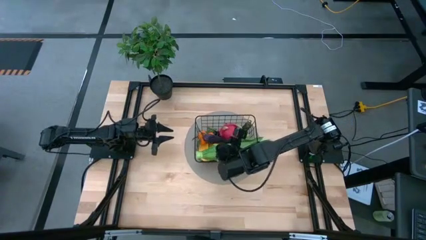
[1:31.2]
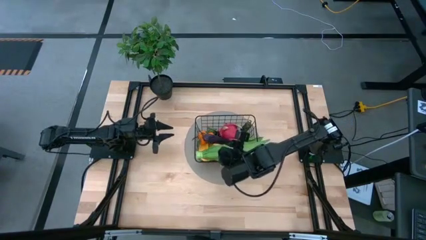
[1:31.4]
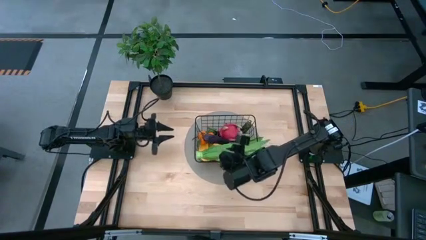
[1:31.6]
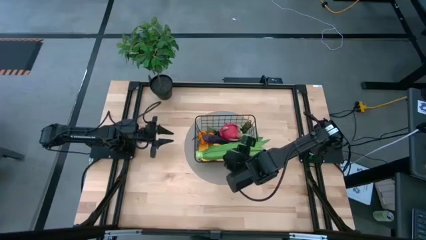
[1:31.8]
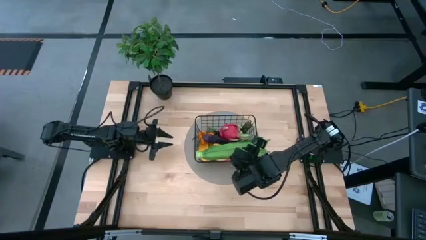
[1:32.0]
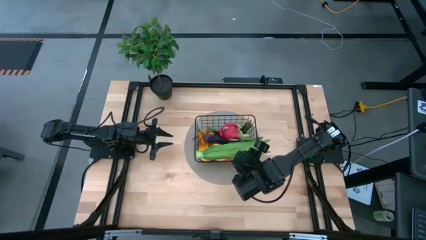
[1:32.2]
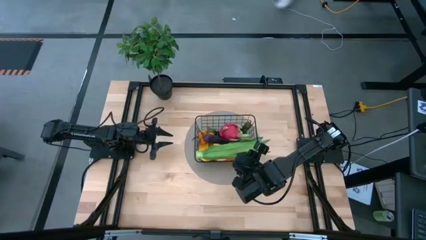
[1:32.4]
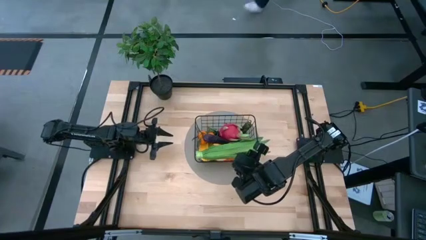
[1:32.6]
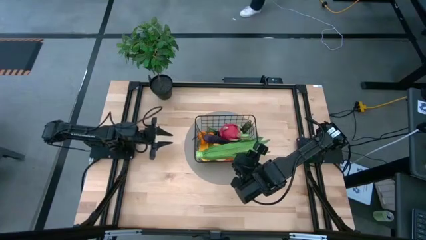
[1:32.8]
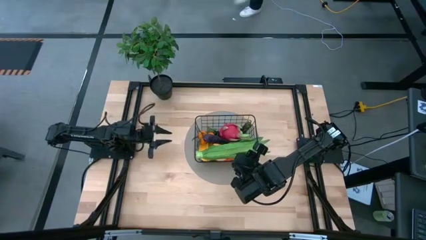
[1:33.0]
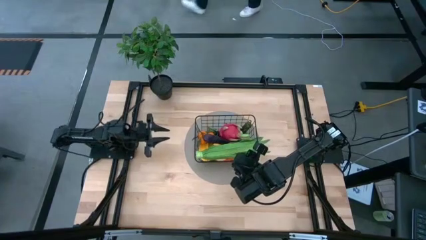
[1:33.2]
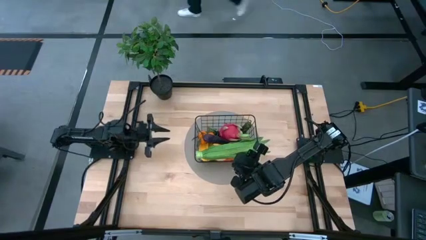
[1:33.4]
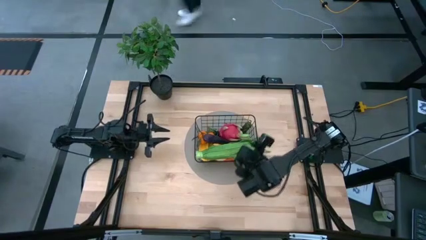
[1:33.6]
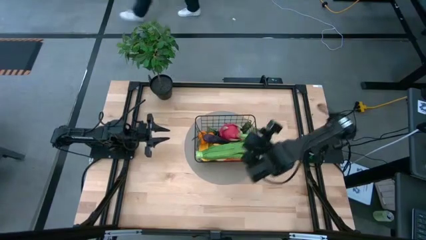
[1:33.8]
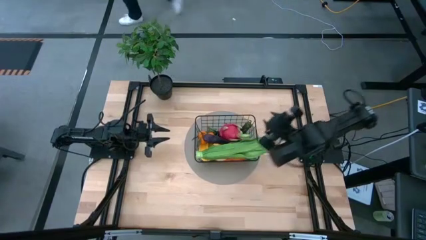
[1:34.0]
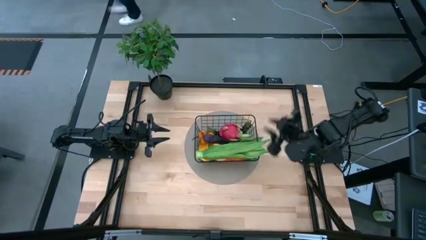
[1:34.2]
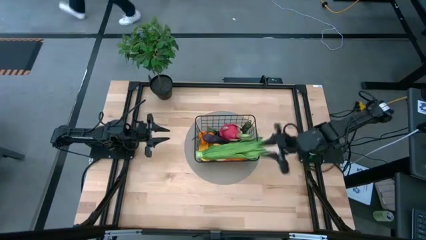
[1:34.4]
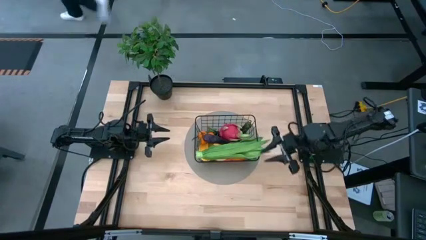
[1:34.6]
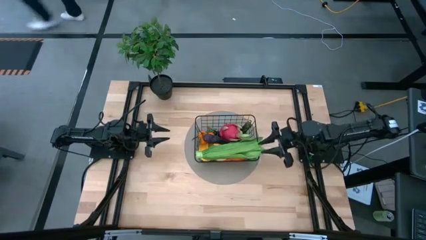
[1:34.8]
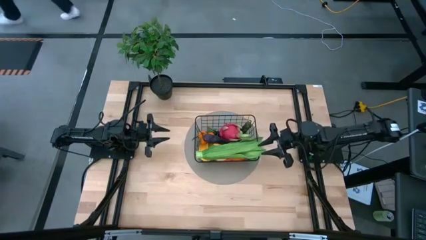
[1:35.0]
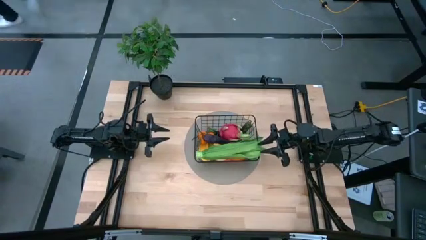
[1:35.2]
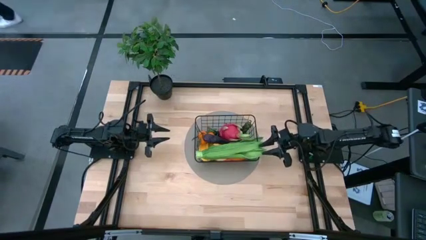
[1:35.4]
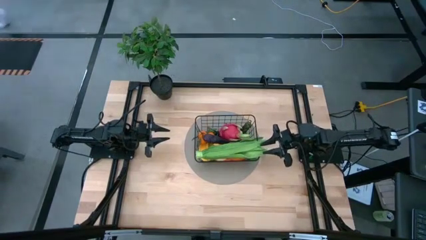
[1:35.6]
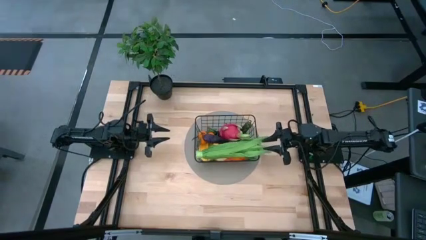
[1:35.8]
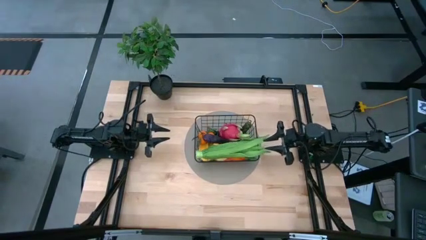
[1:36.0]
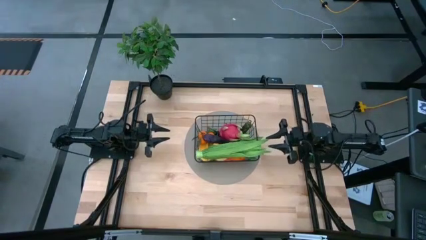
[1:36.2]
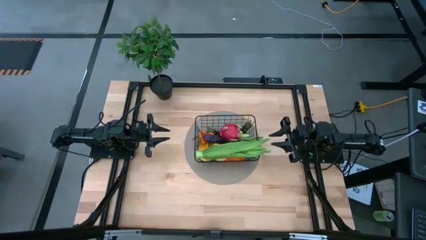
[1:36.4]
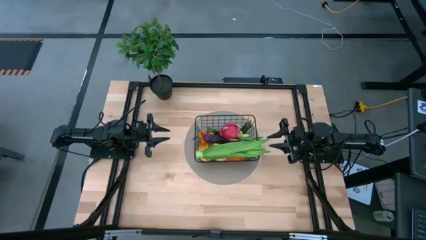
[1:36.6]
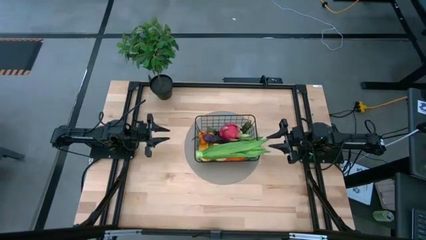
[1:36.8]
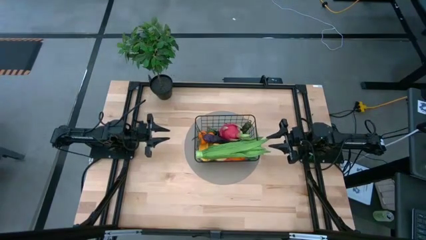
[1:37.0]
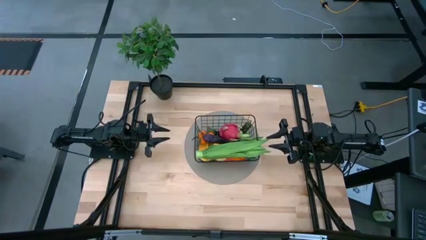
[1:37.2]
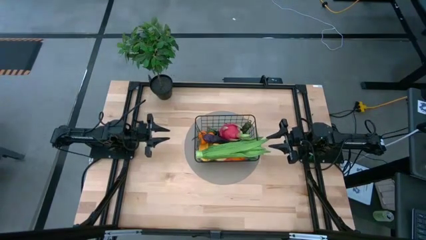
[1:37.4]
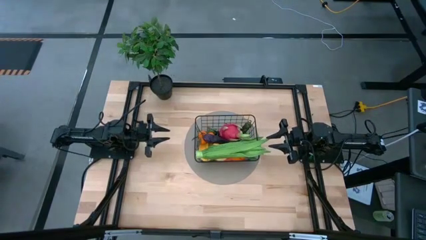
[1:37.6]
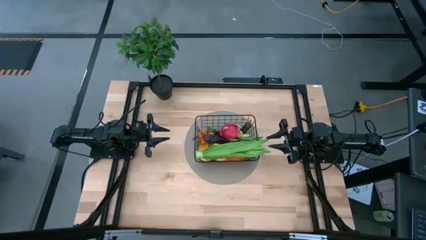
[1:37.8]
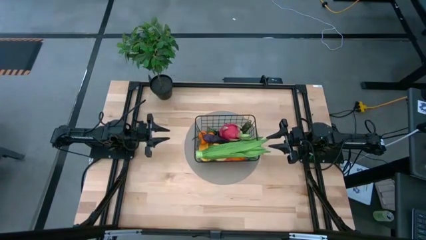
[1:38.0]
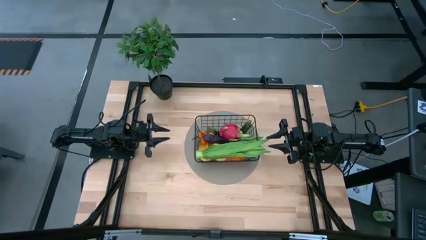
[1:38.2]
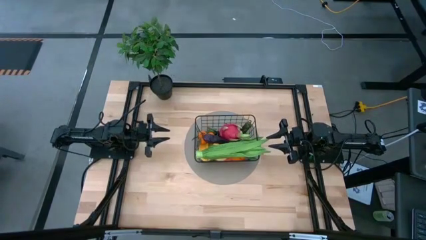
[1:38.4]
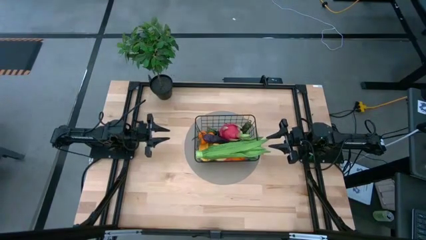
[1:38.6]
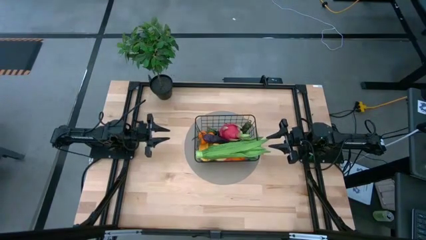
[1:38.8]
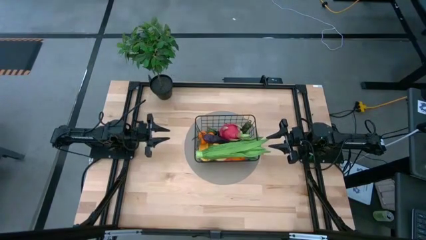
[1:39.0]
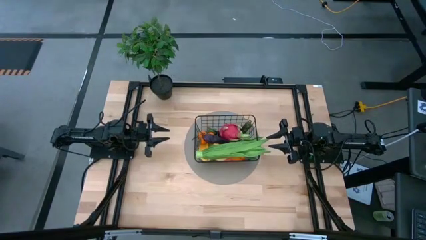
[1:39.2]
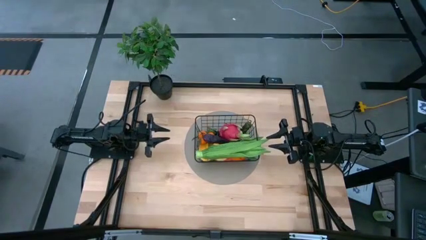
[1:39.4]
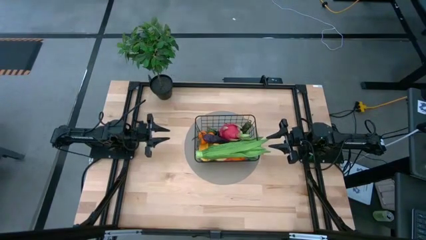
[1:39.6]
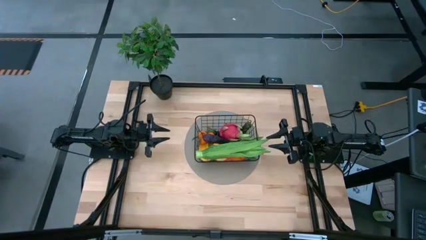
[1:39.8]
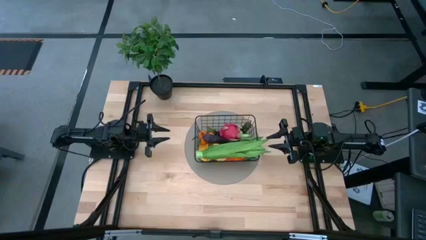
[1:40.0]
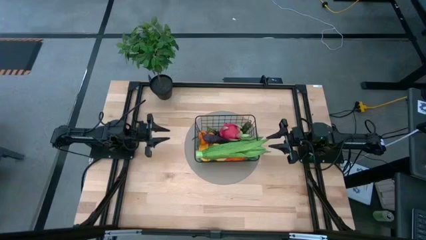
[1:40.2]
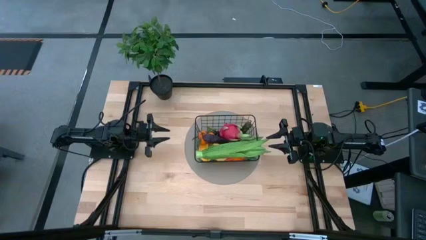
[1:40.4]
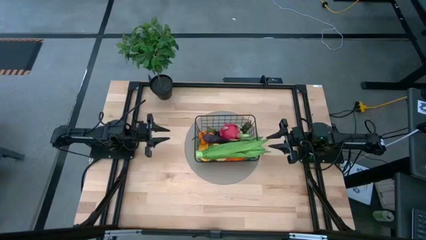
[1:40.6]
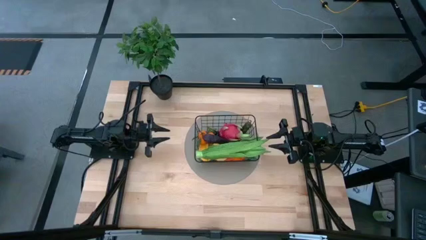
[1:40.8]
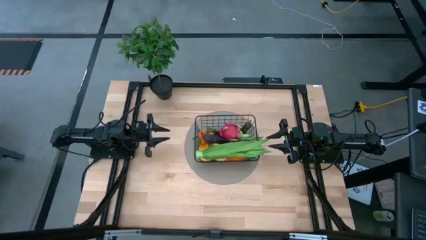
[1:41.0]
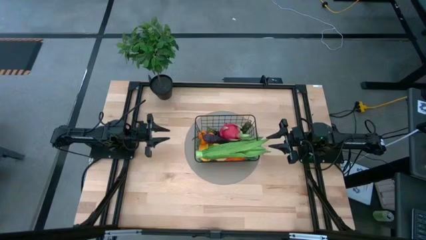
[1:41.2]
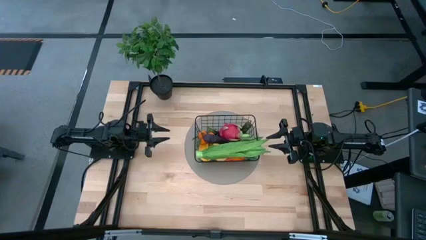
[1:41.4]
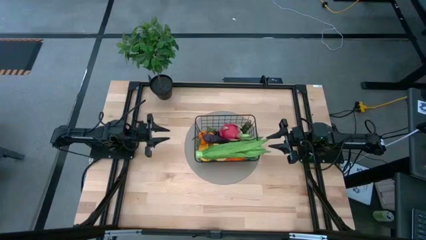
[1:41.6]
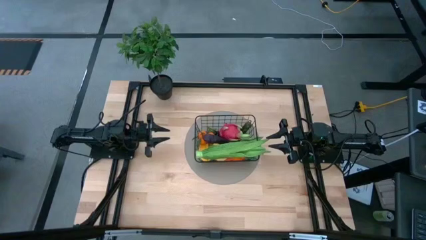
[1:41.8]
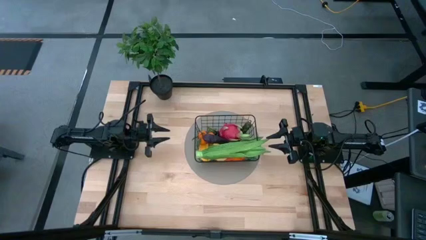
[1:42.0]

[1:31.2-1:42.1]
Task: Build produce basket
Return to Home Position

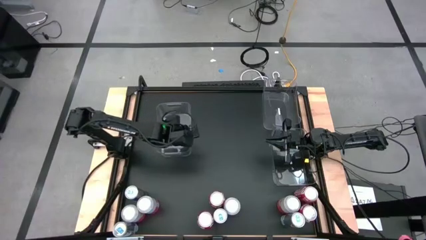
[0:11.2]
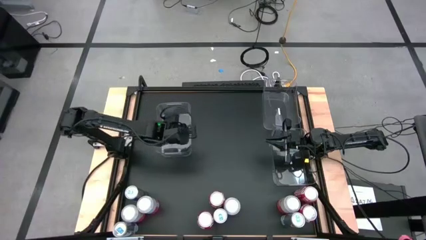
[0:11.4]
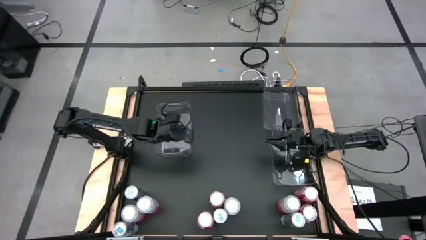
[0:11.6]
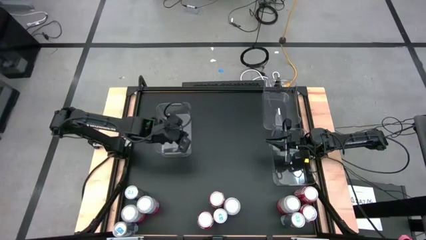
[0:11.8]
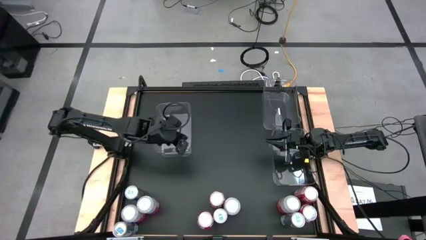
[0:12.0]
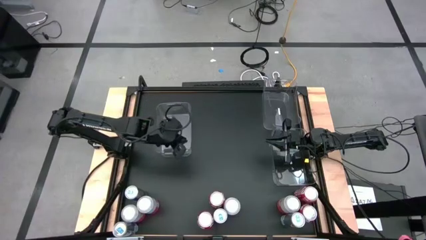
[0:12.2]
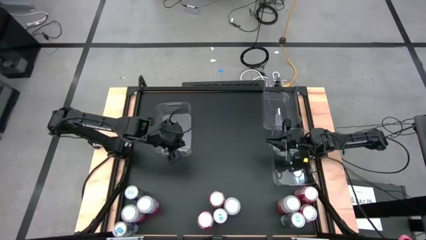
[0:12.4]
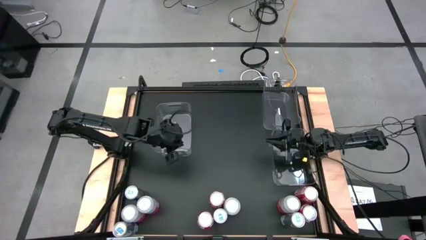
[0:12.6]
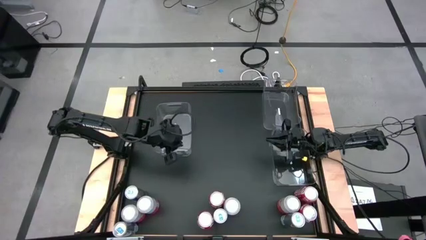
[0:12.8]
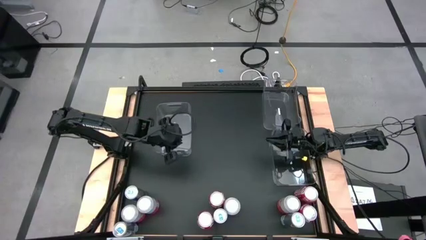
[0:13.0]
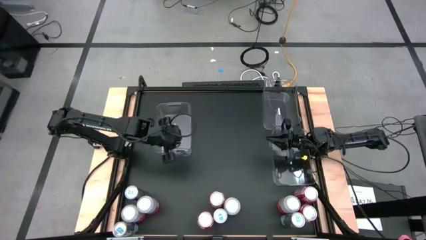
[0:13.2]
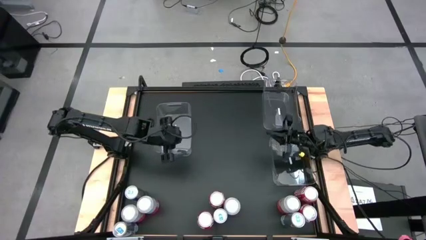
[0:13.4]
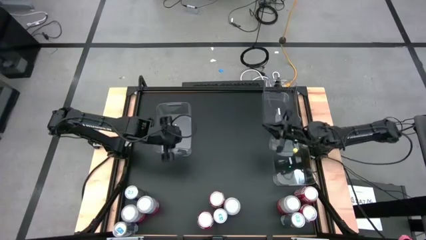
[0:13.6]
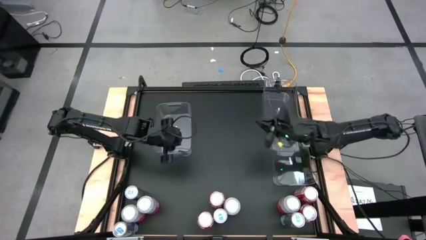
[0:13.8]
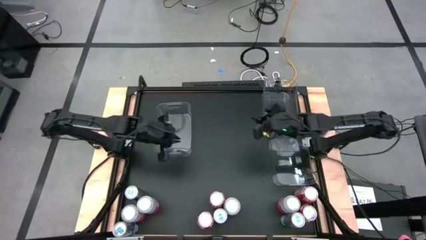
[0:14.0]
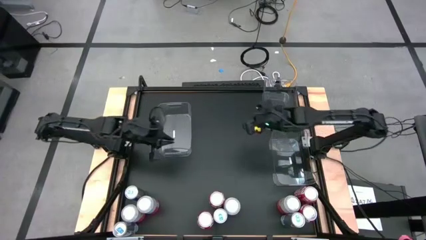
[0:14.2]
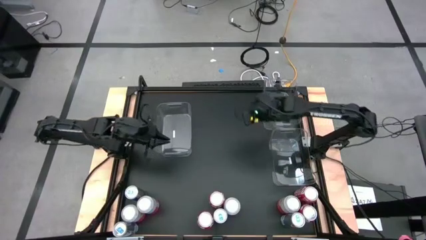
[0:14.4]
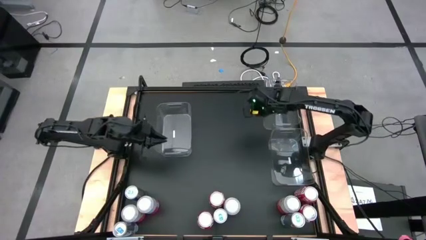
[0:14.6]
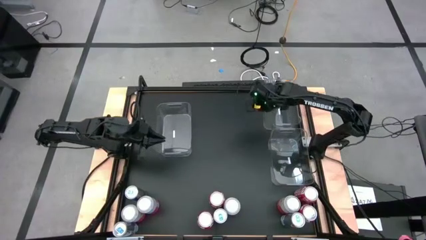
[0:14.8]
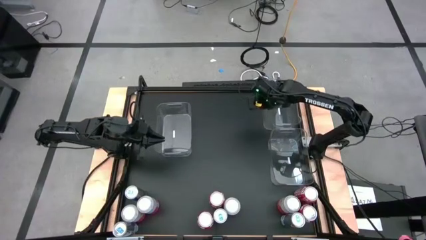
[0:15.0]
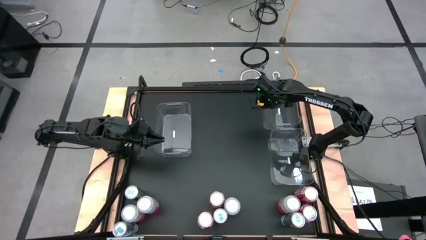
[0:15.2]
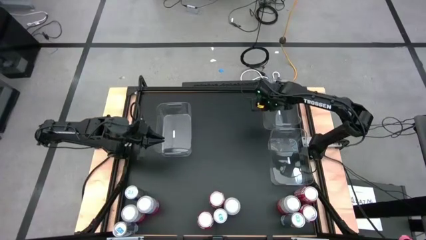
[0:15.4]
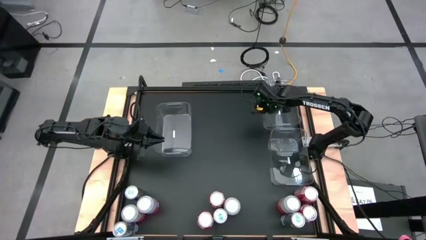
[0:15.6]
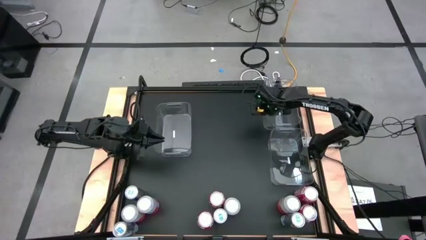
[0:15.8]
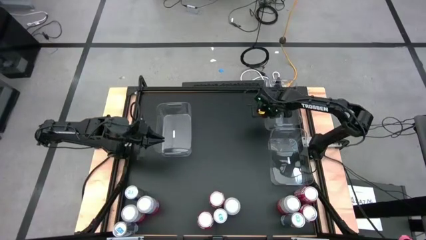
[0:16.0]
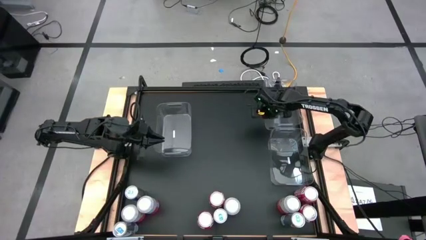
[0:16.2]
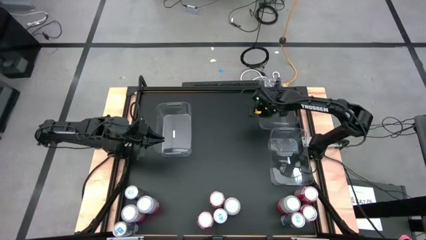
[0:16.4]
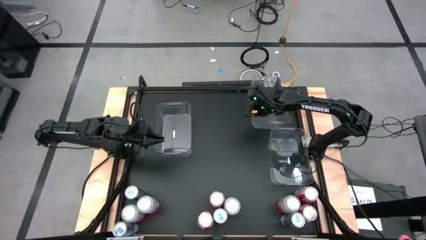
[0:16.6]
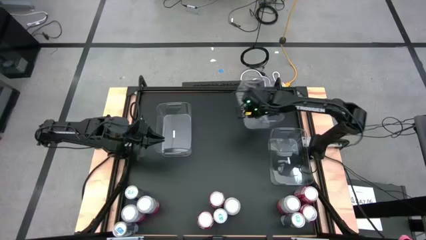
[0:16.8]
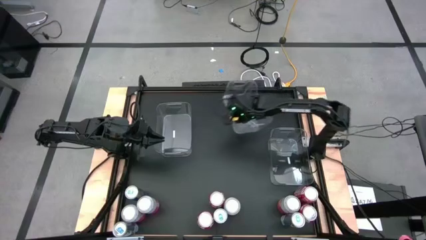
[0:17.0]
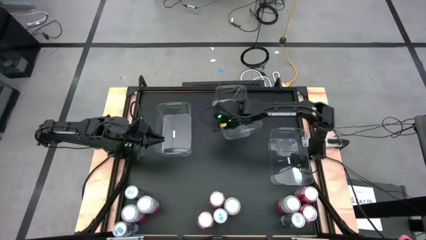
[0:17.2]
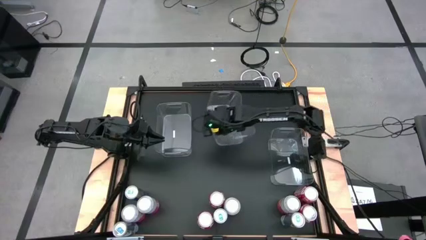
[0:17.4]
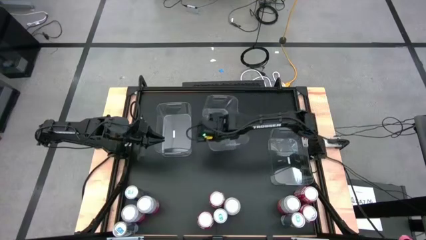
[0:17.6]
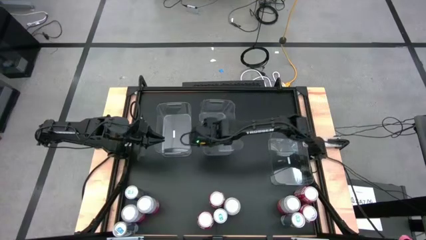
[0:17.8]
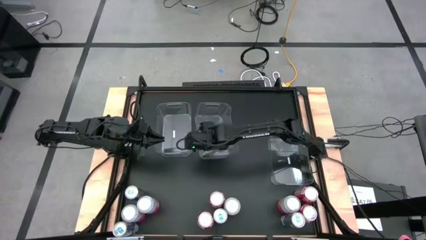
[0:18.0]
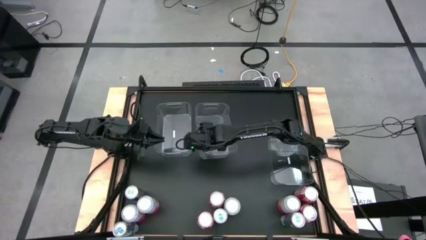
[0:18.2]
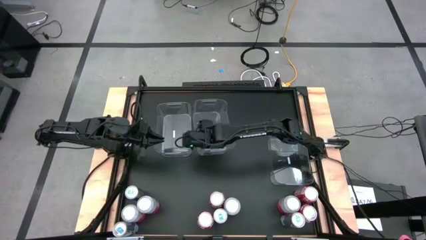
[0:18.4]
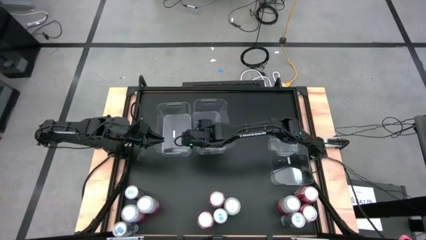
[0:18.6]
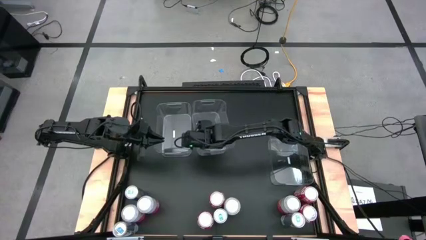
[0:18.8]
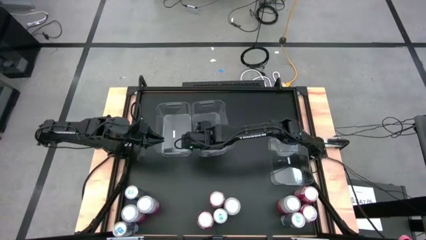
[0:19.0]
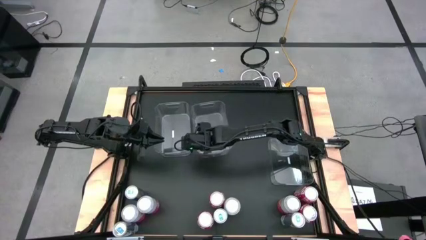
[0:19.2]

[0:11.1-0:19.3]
Task: Sort soda cans
Move the top transparent bin to the right side of the left transparent bin
